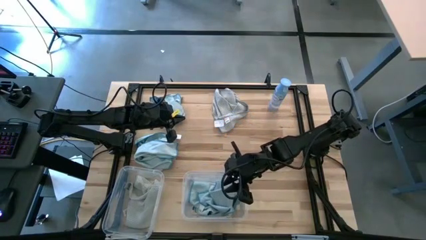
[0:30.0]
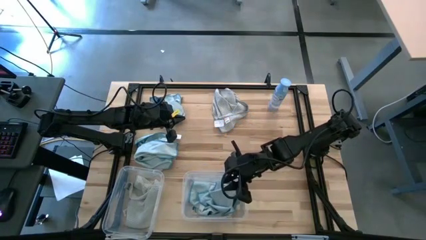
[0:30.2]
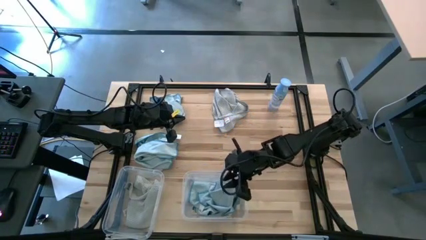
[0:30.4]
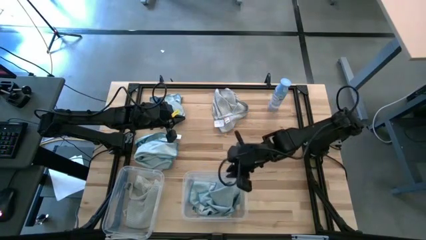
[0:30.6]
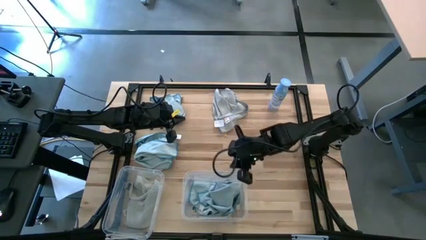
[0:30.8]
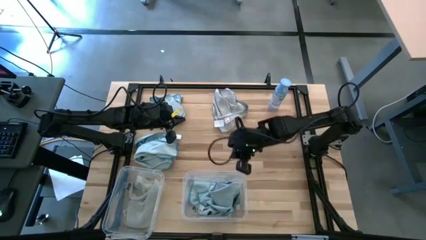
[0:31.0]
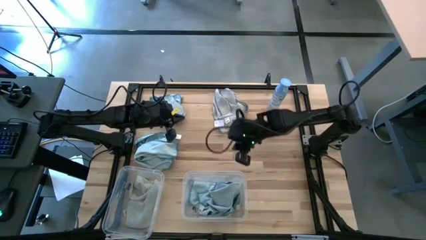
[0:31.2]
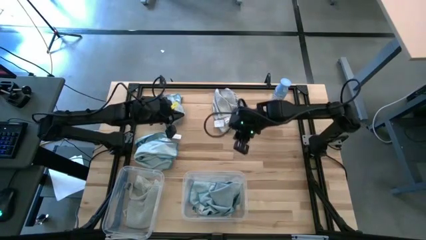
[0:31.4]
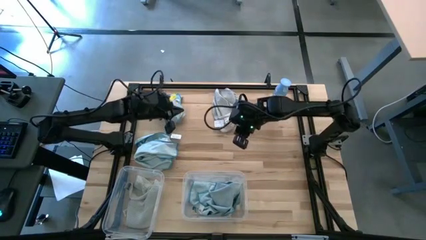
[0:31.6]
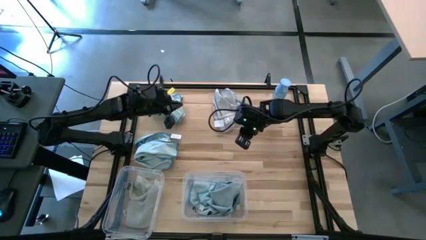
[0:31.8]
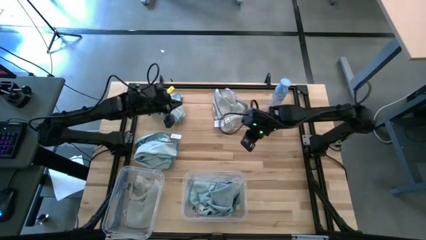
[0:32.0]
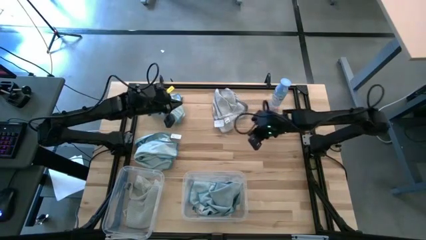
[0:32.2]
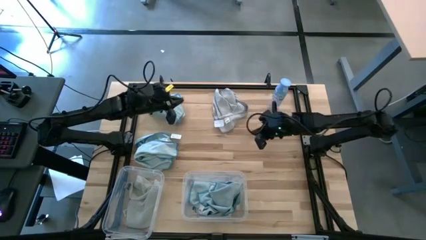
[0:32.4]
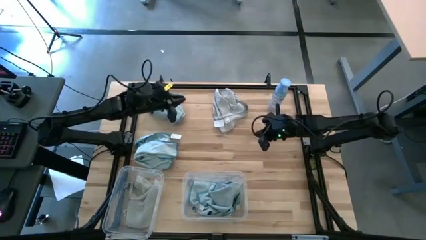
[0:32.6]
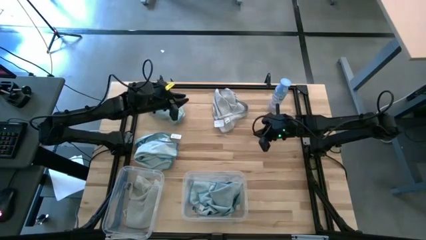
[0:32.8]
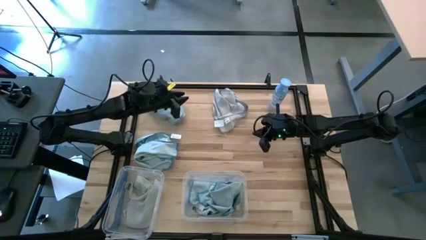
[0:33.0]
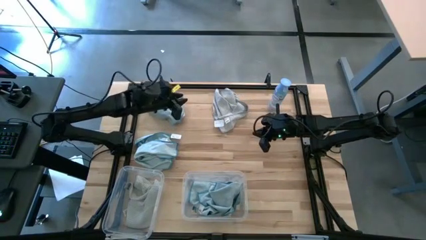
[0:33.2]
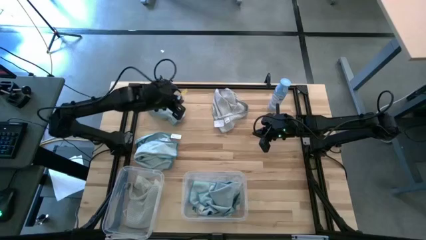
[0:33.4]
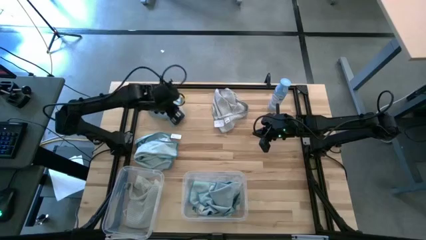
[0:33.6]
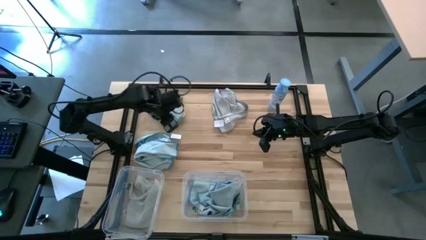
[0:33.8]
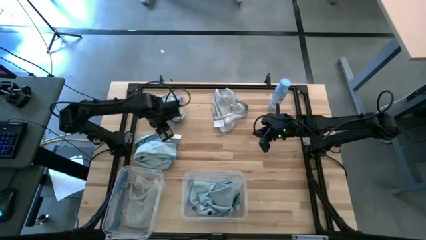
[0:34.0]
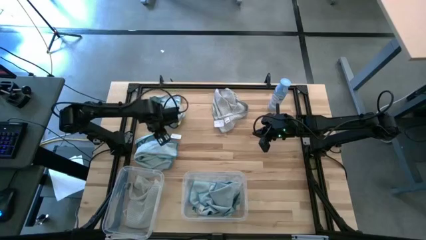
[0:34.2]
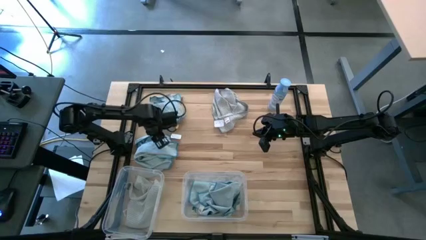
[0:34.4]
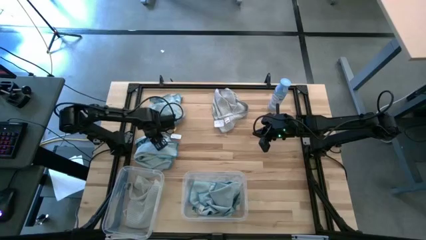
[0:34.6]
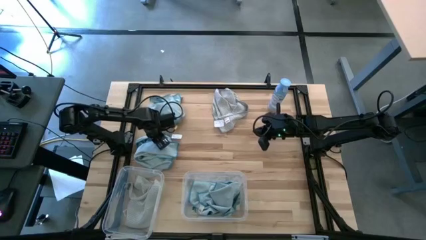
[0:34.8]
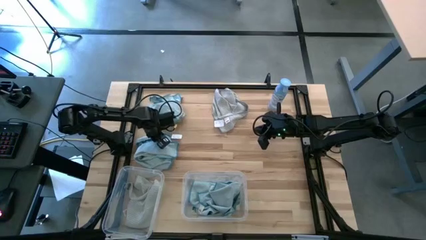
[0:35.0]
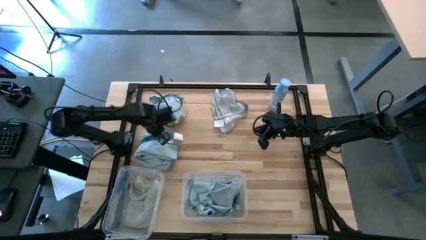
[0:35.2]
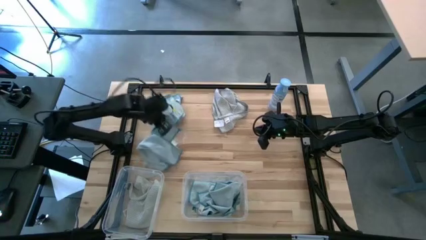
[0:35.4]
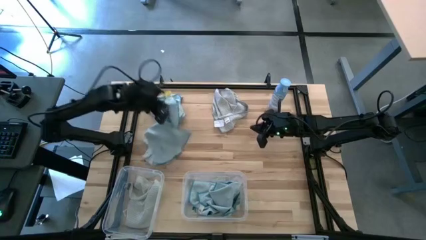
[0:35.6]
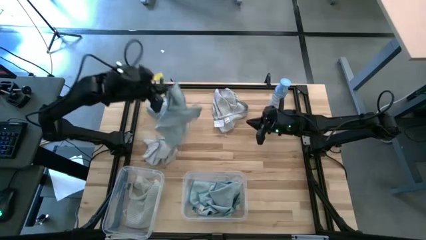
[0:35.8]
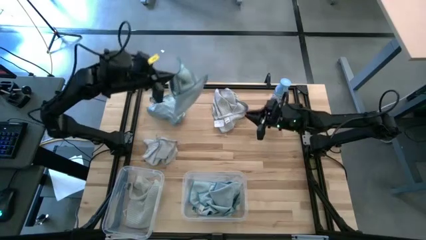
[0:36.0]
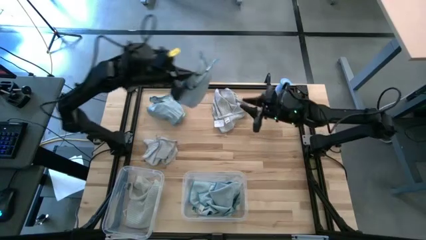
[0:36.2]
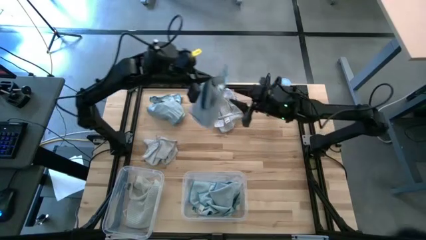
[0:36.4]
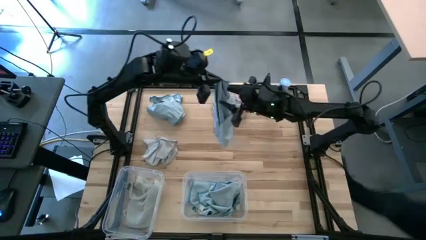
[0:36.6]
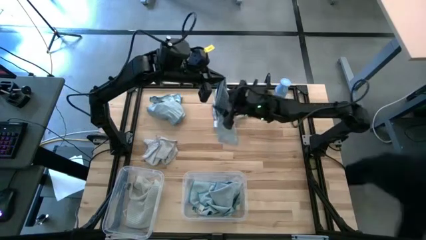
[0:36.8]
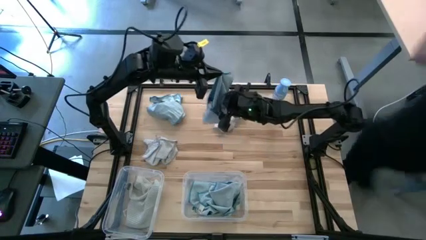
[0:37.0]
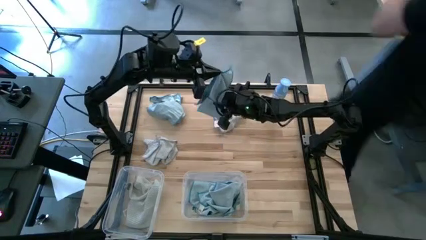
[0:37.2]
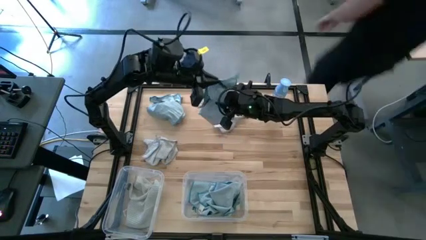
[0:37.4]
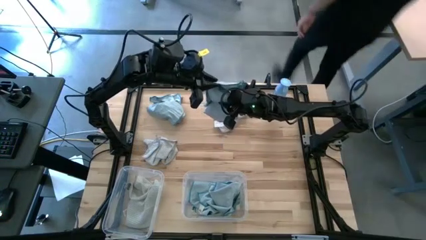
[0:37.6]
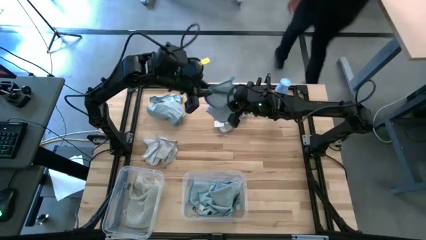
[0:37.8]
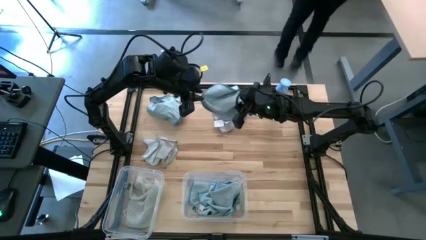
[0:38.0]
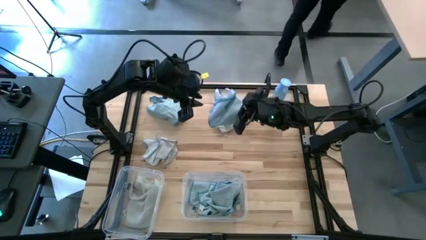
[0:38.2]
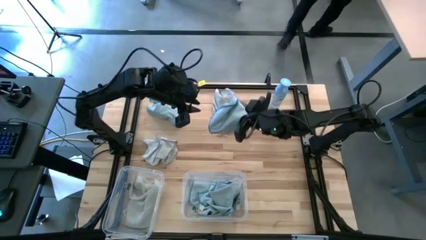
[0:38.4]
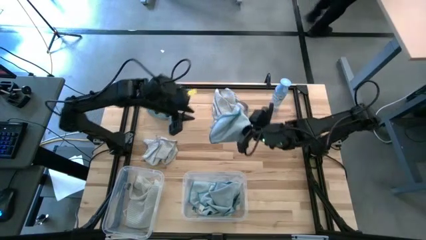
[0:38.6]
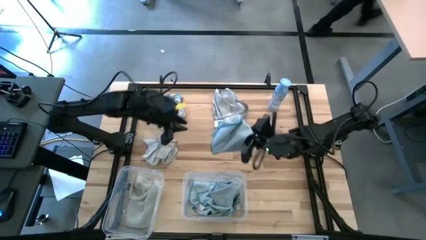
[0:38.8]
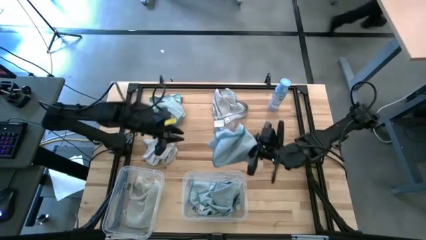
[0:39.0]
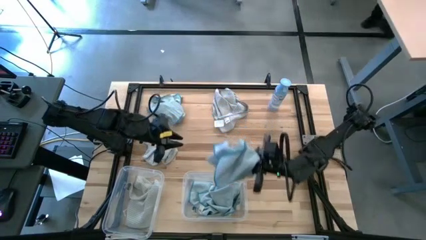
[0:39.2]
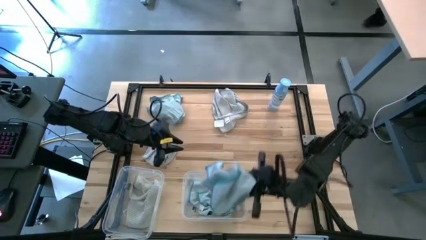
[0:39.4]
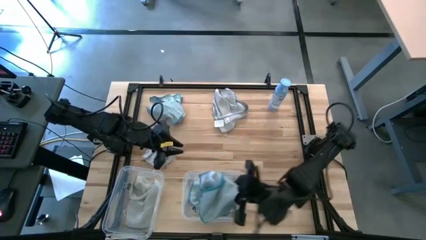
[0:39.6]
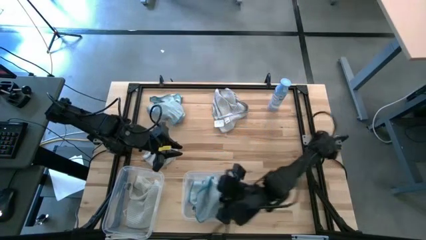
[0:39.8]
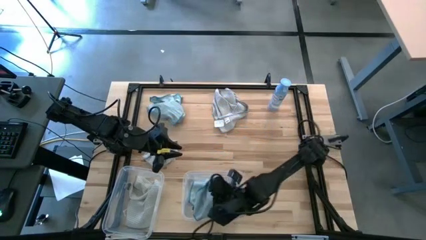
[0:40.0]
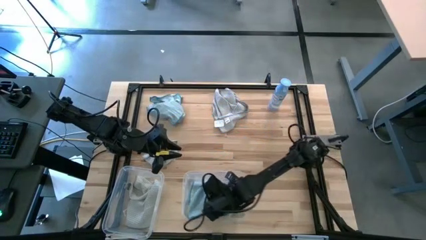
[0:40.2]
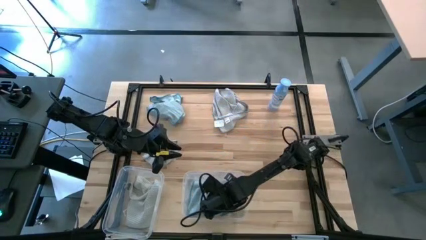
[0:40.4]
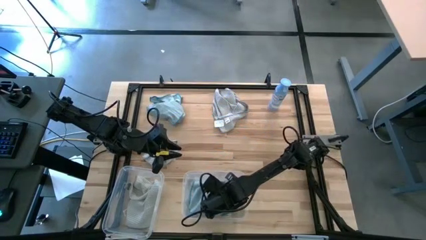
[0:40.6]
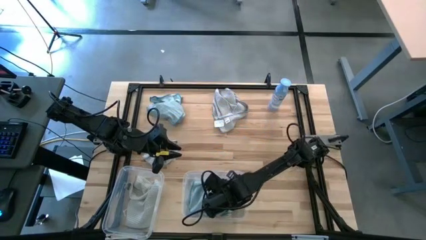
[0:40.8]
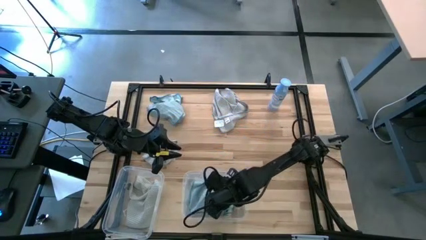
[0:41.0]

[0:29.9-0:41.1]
Task: Sort microfiber towel by color & place in baskets
Put the bottom left blue towel into the right transparent bin

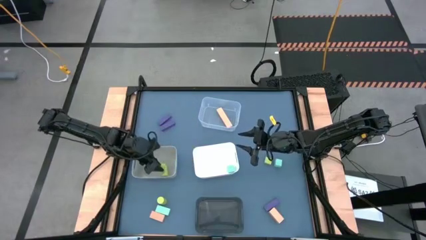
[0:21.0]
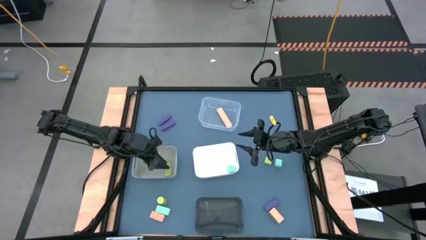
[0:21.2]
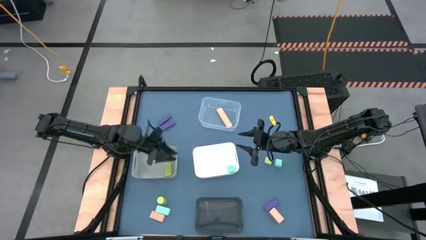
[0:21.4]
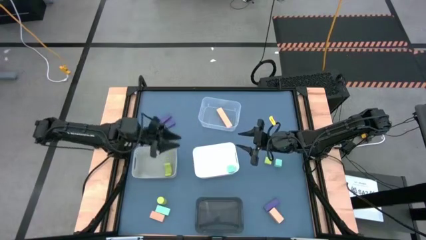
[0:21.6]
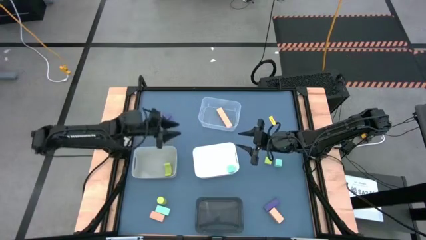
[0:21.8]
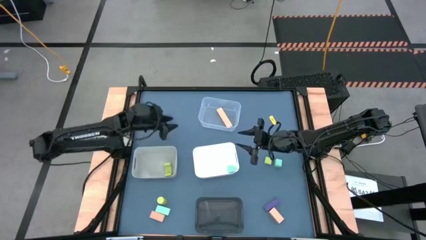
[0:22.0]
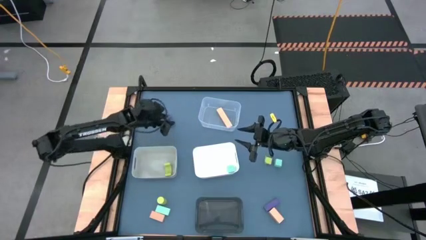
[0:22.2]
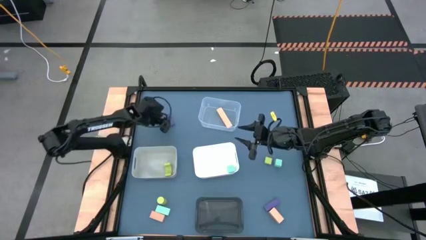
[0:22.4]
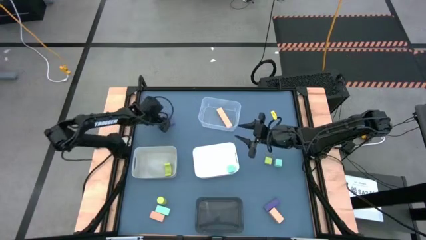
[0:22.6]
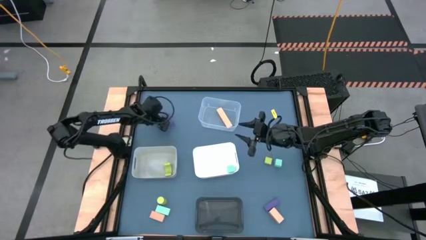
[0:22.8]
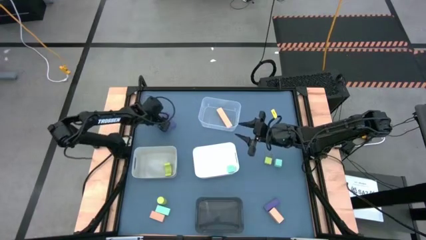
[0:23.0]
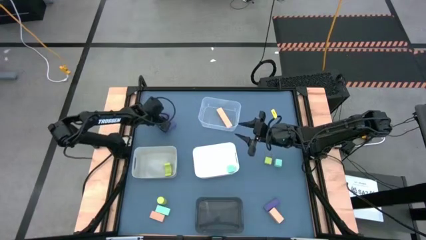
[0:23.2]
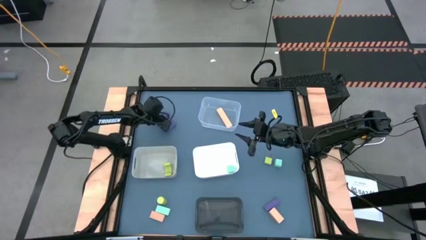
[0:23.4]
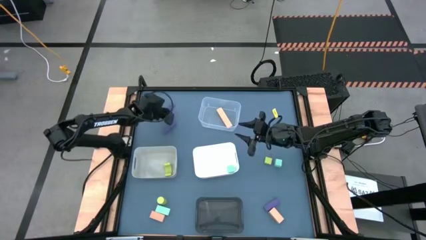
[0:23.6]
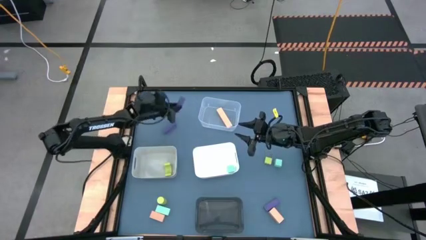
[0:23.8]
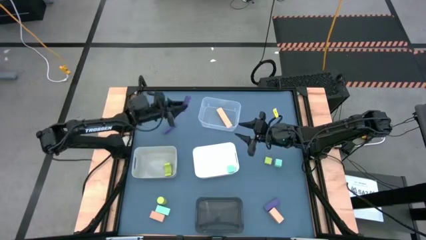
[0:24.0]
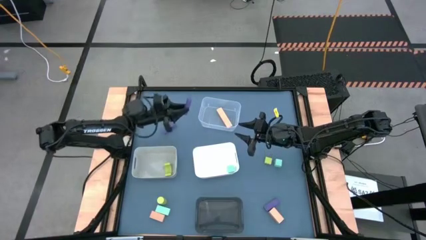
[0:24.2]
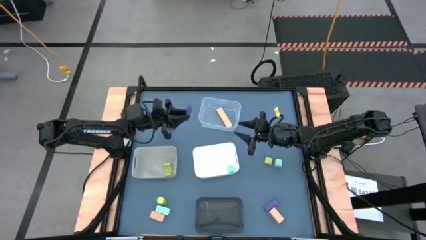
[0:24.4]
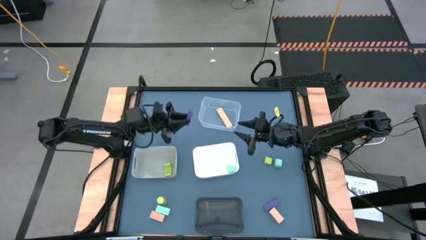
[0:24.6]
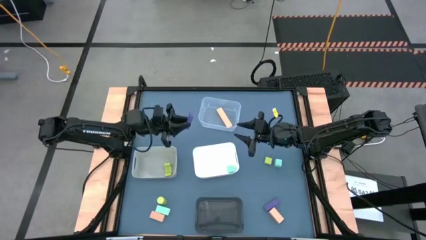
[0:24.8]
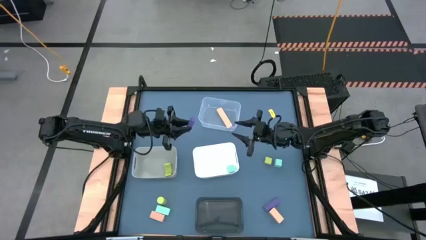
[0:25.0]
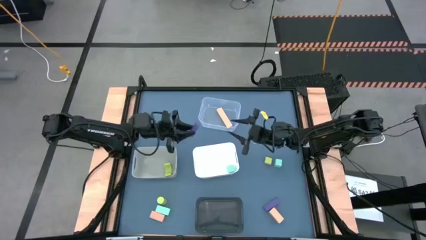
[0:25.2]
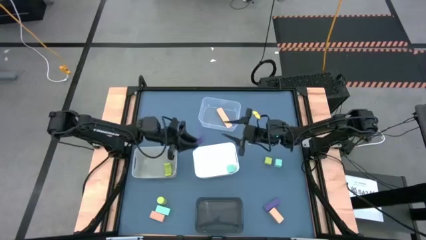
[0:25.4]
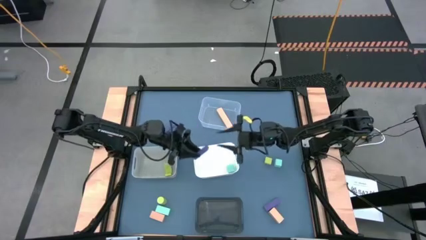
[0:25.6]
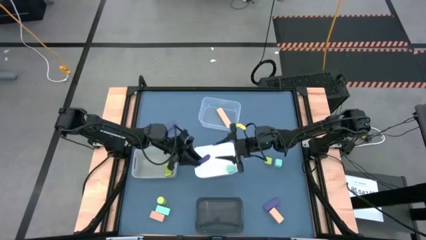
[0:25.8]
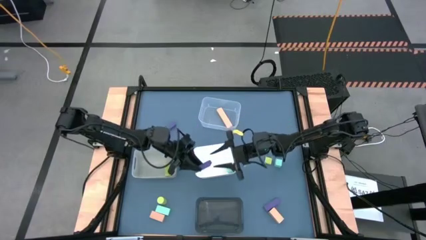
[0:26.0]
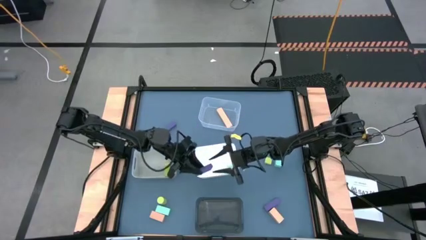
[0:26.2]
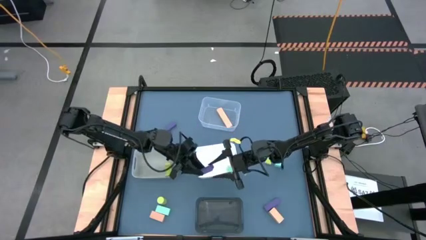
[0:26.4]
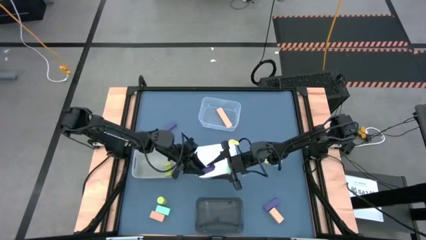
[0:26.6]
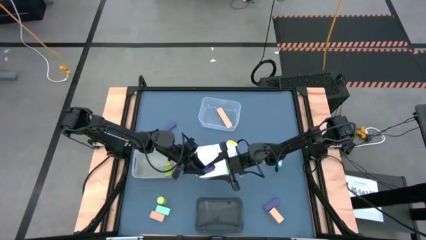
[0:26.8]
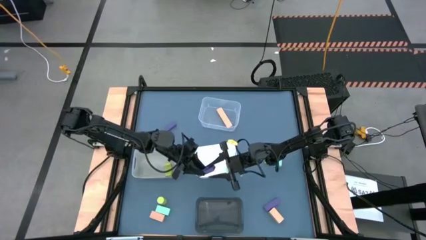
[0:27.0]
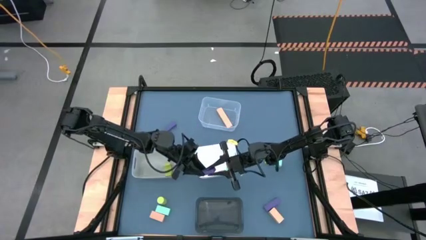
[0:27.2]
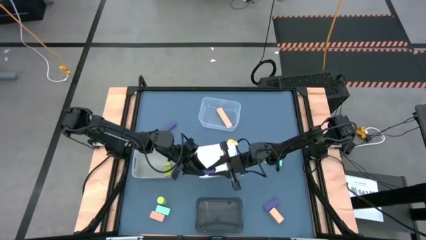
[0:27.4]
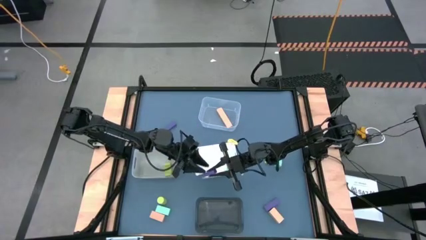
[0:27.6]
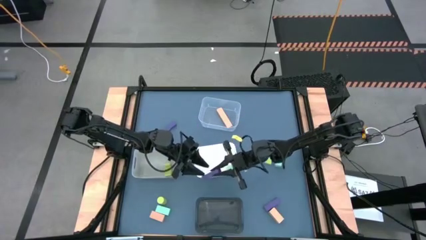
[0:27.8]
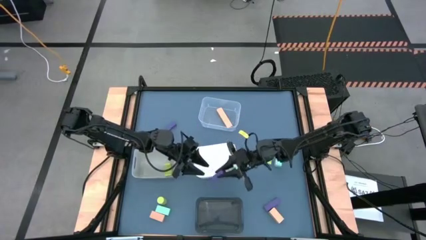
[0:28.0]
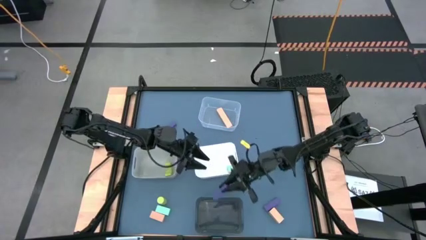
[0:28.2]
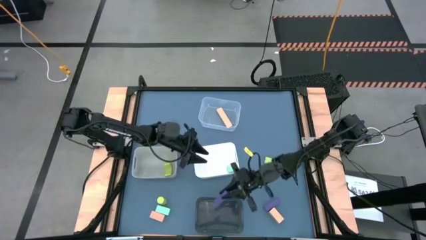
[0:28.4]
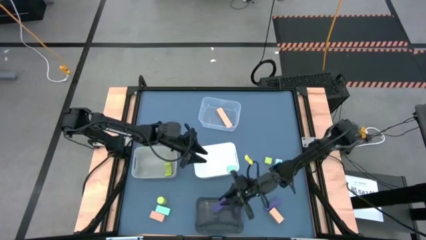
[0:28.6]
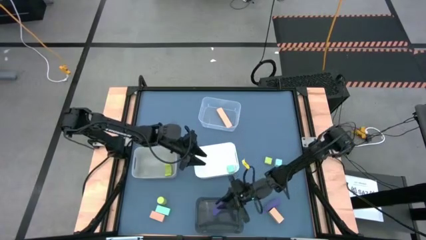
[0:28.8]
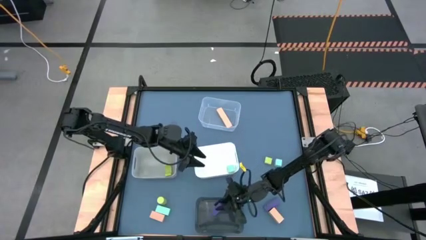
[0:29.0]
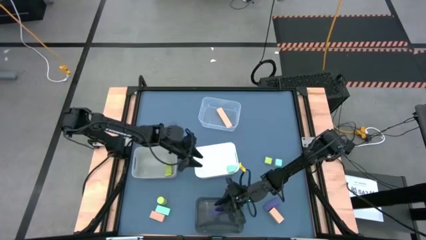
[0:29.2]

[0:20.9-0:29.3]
Task: Sort & place blocks by color
Put the top purple block into the black bin
